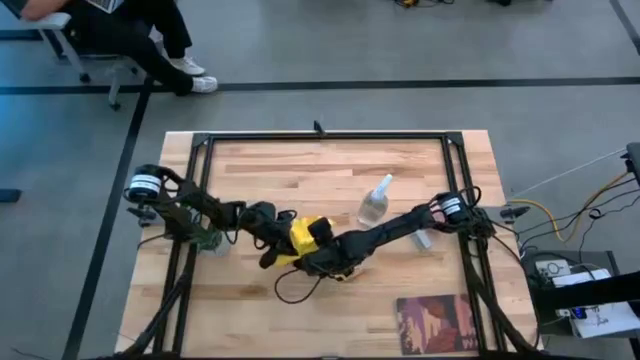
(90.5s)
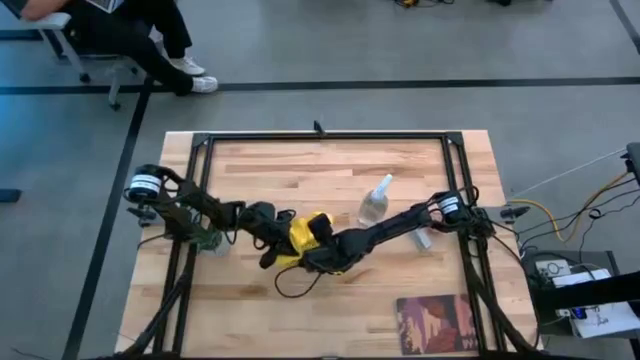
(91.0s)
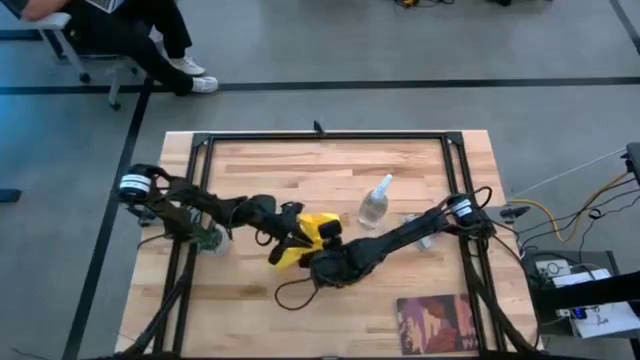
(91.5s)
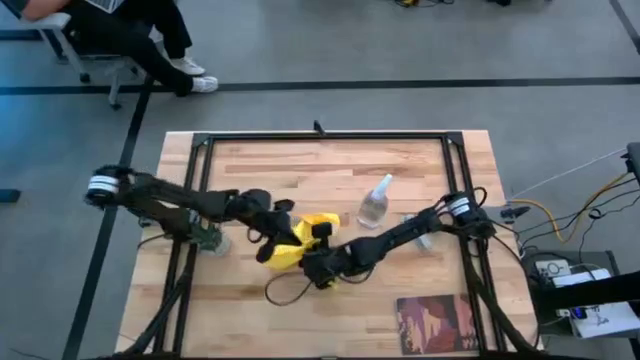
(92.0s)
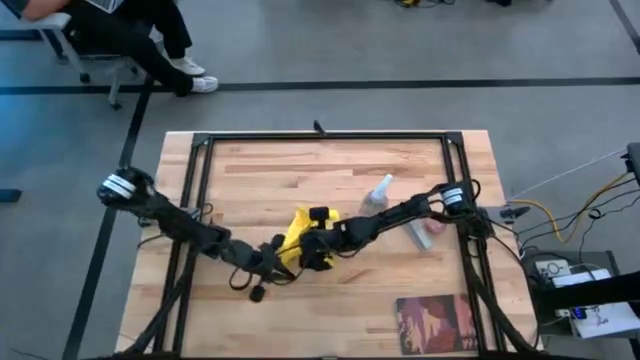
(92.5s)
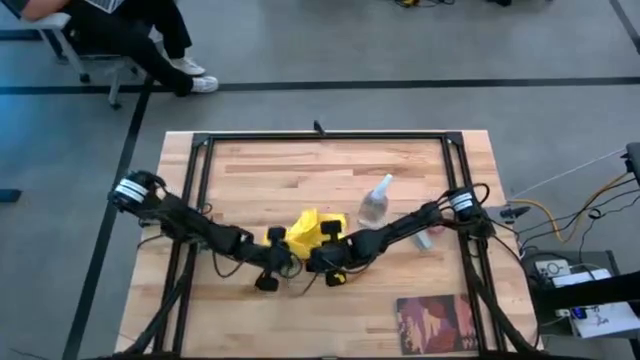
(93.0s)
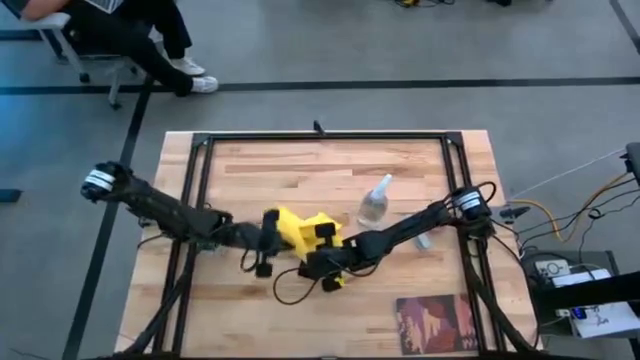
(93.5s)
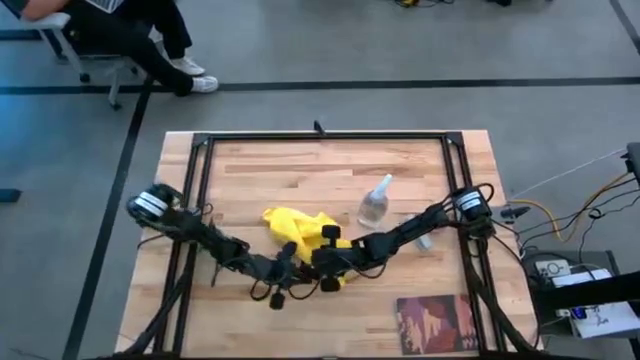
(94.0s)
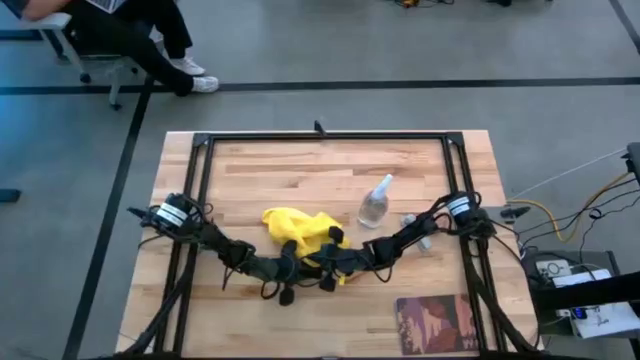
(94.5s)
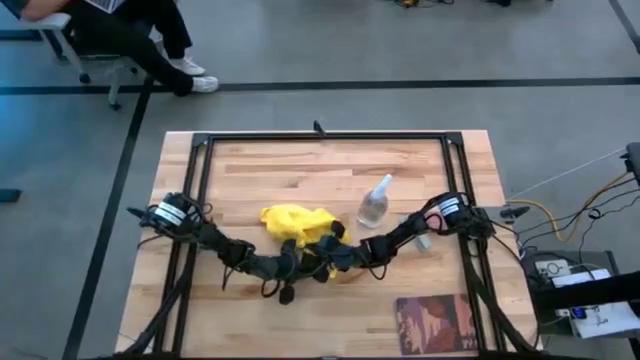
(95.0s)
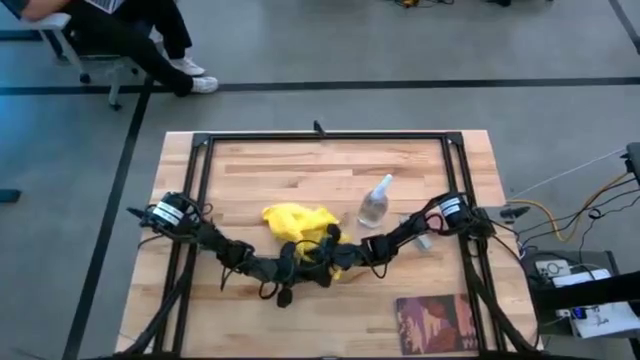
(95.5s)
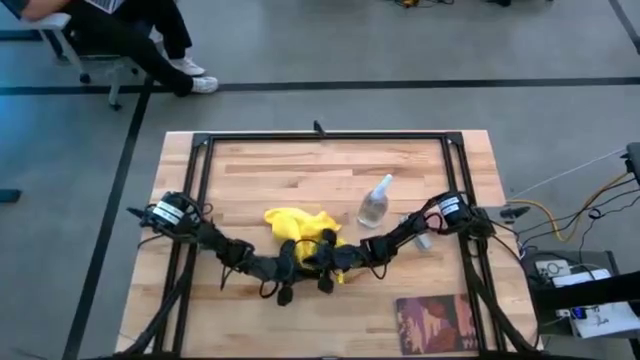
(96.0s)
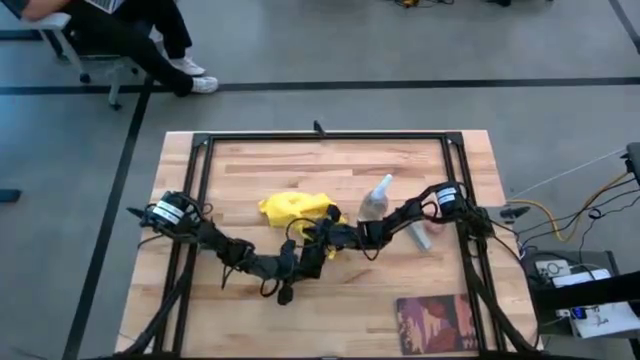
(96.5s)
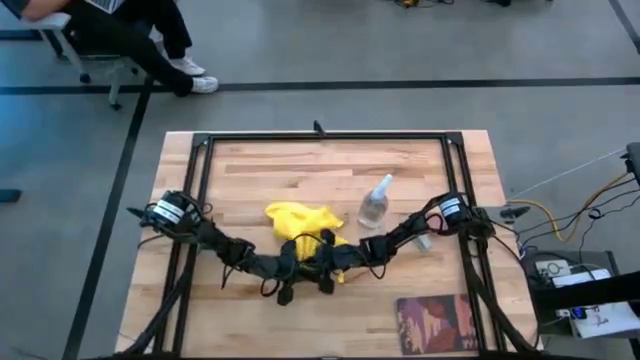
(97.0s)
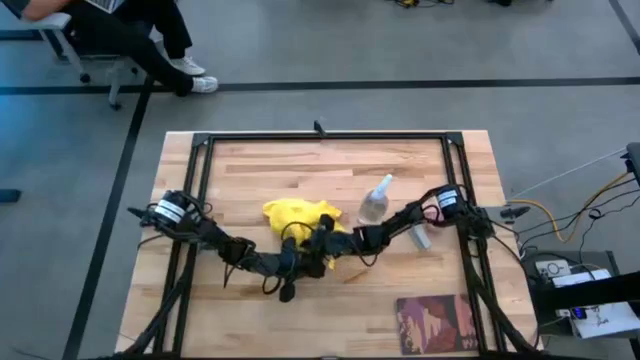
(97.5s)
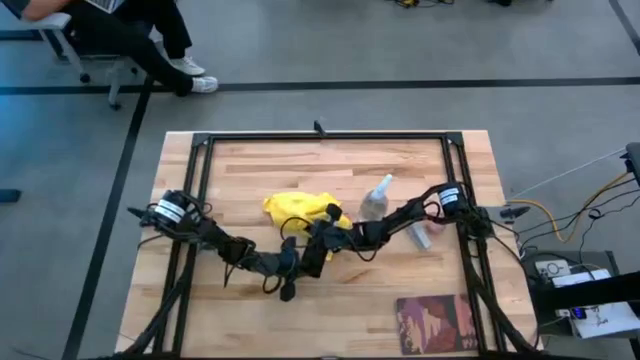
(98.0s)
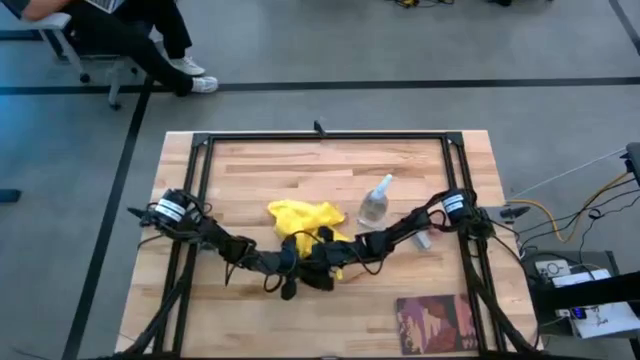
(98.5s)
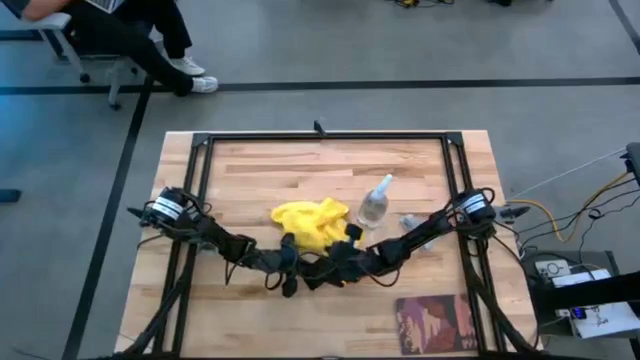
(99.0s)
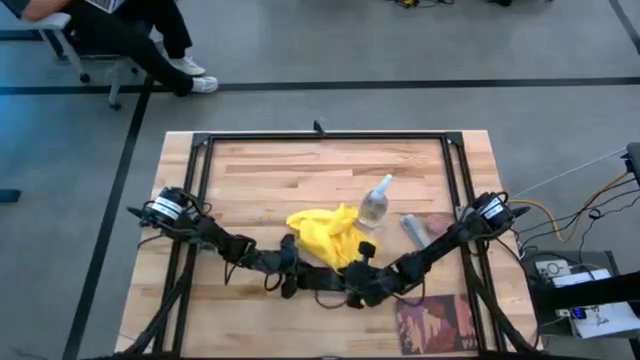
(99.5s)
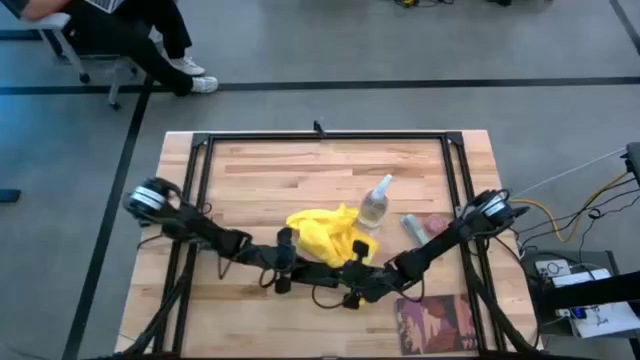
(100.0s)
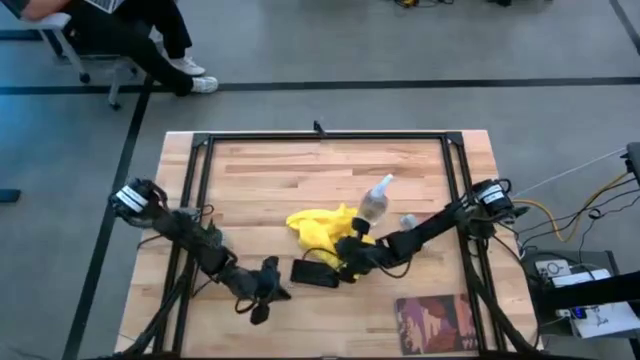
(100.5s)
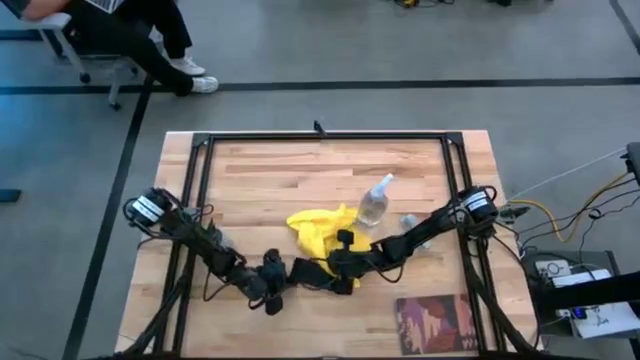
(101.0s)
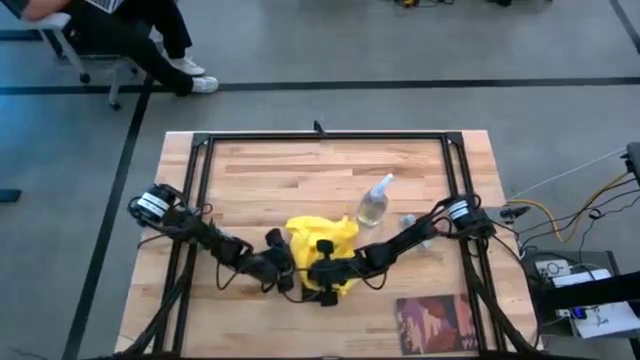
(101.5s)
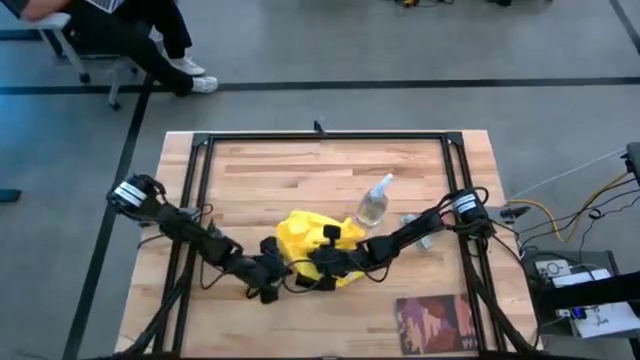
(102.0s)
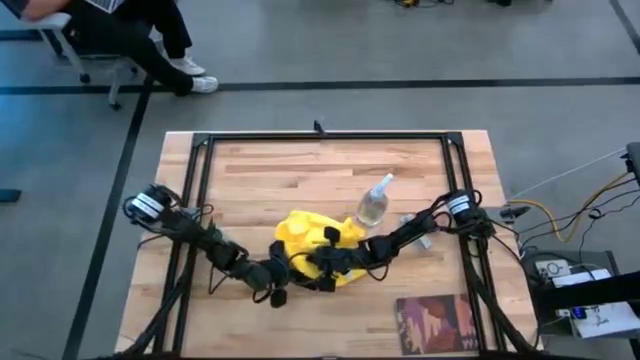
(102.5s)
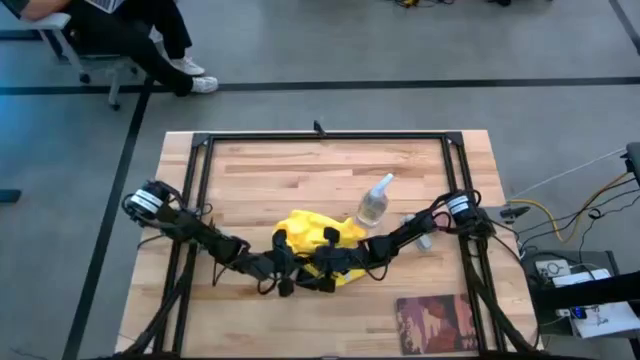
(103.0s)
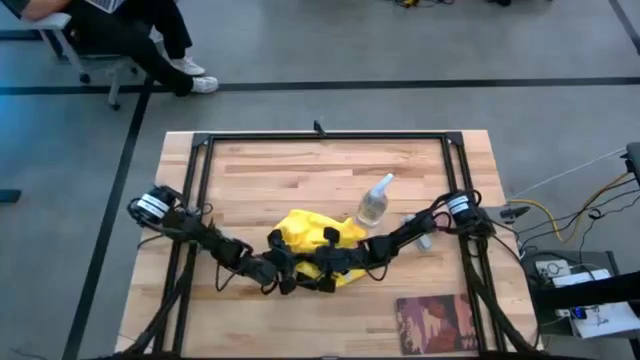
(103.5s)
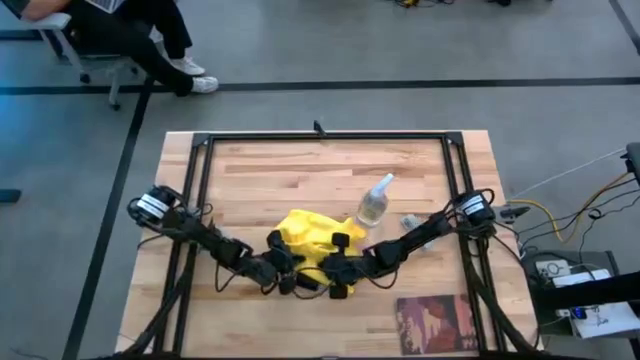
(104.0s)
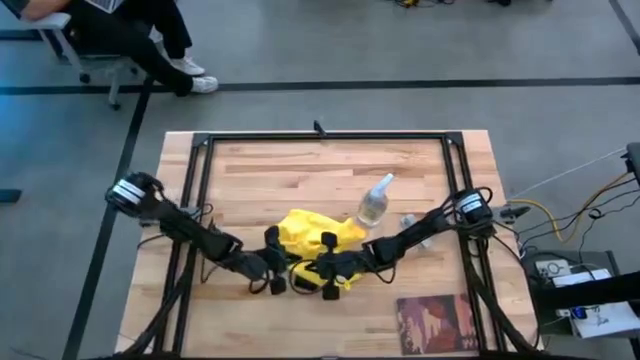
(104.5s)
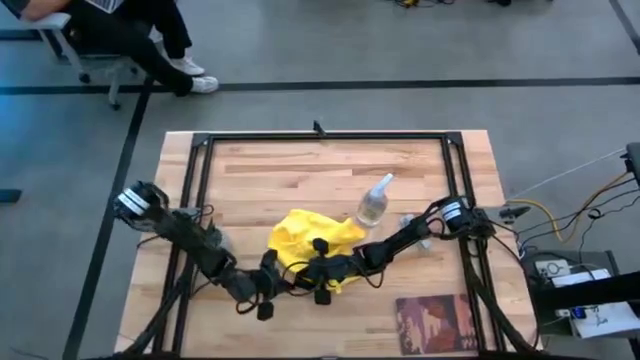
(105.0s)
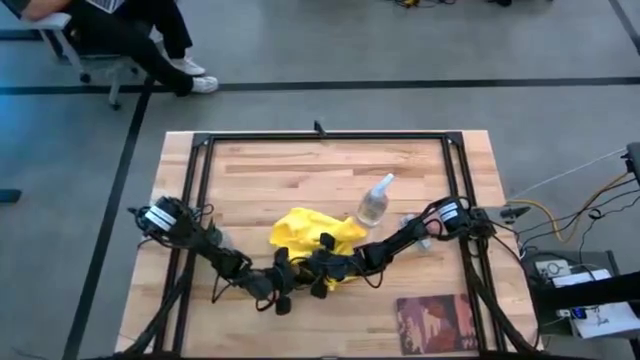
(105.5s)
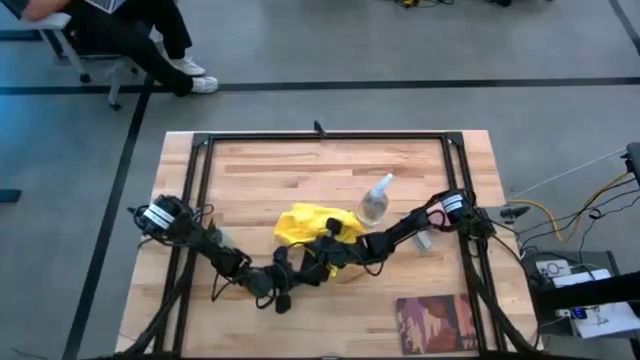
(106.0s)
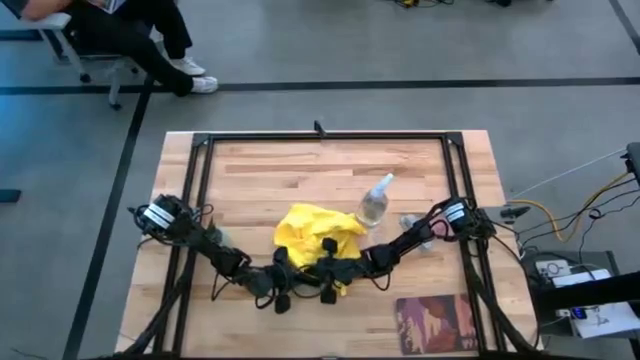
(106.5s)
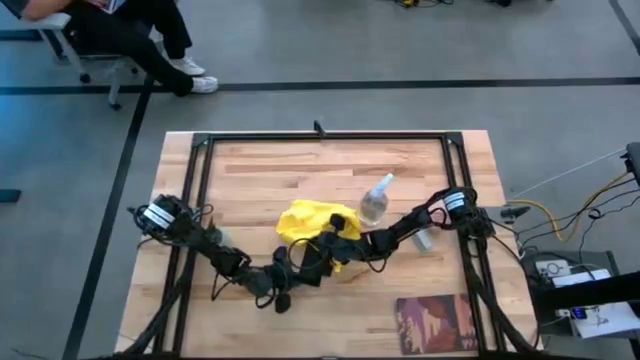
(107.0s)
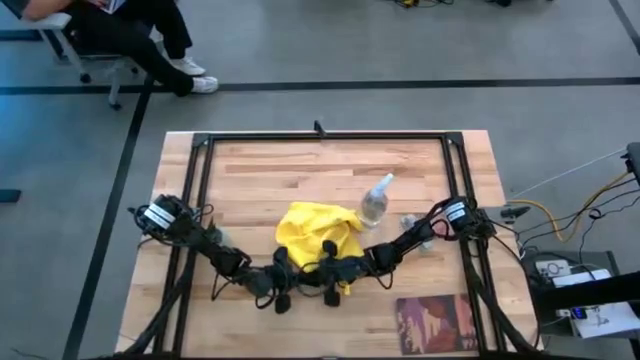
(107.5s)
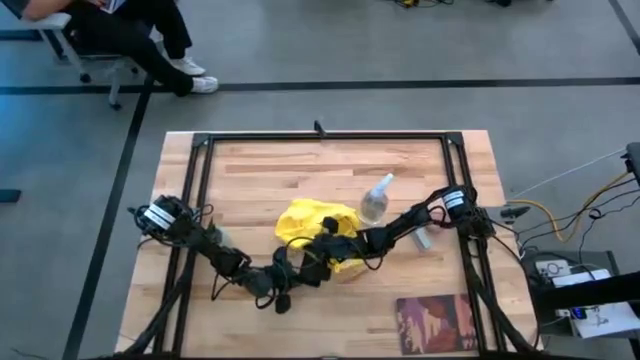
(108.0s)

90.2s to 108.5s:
Task: Apply microfiber cloth
Wipe the front and back of the cellphone with the yellow microfiber cloth
